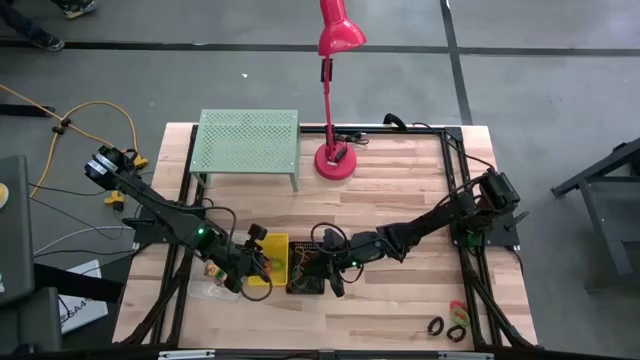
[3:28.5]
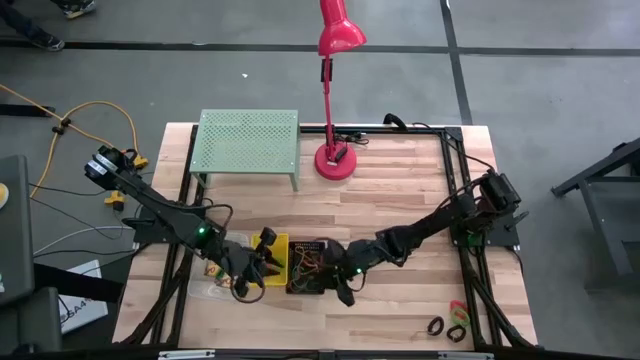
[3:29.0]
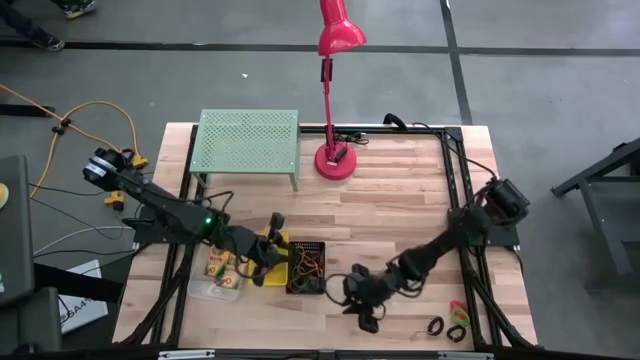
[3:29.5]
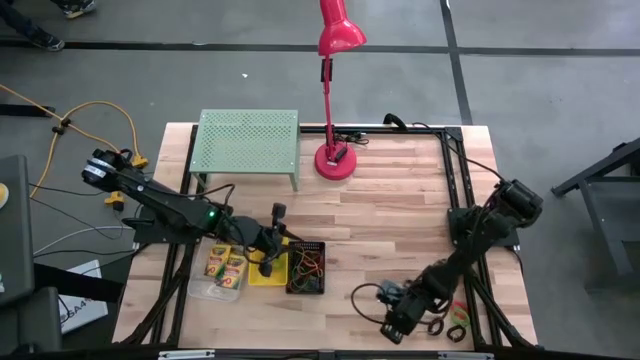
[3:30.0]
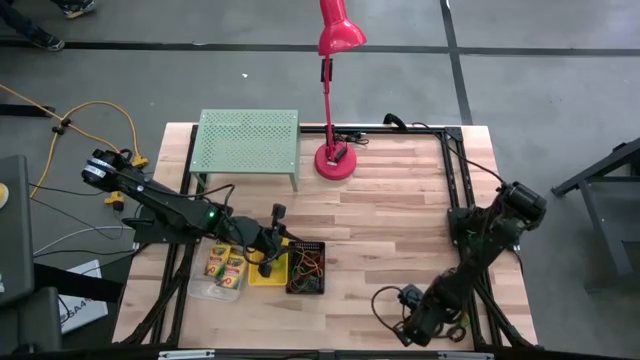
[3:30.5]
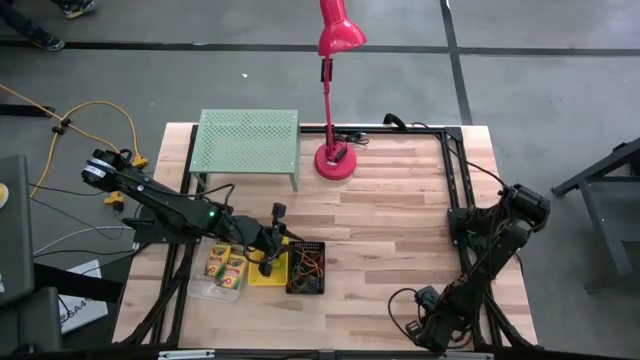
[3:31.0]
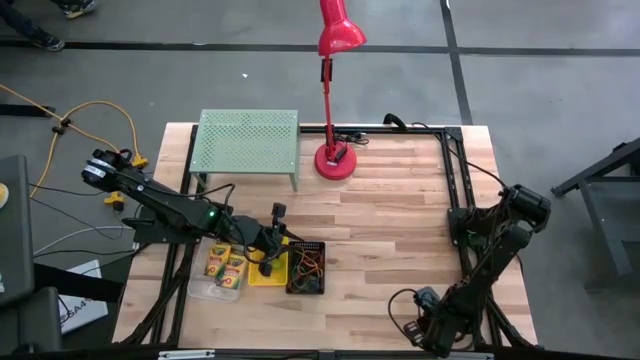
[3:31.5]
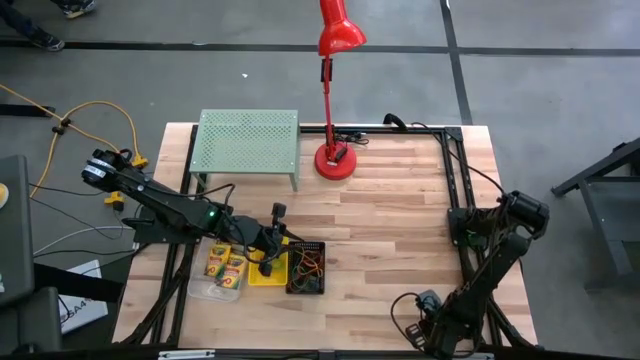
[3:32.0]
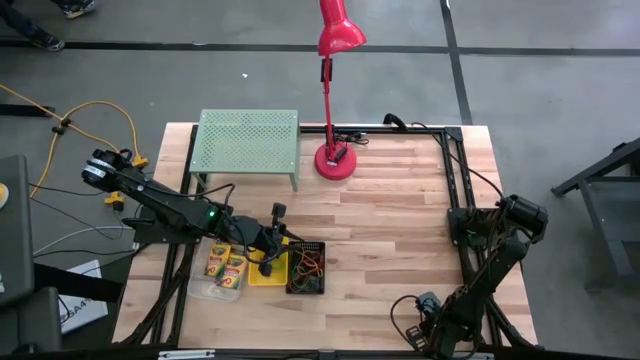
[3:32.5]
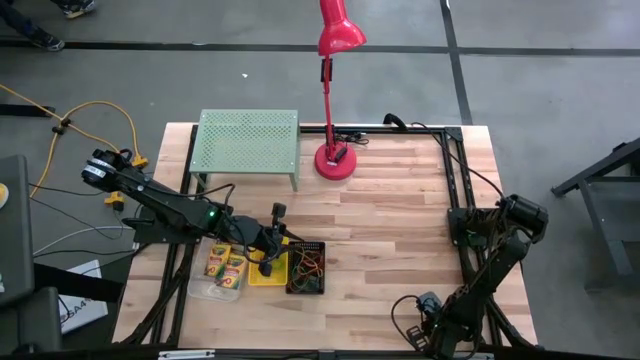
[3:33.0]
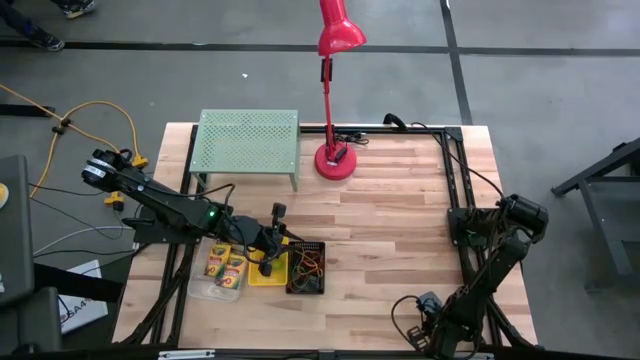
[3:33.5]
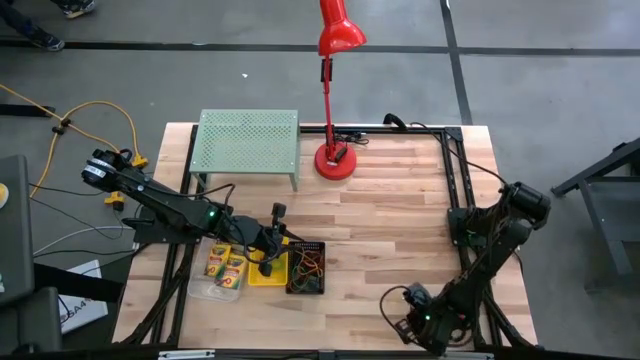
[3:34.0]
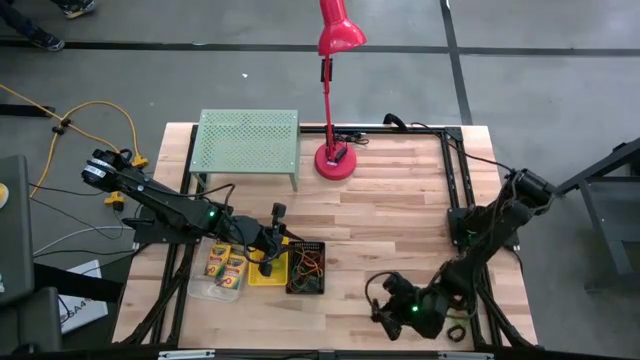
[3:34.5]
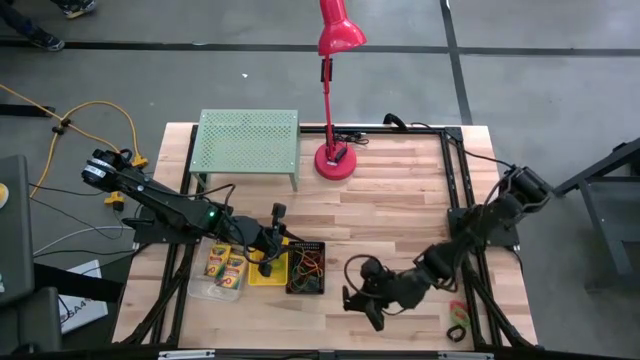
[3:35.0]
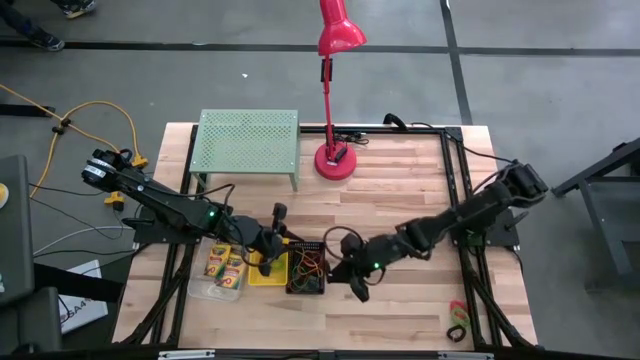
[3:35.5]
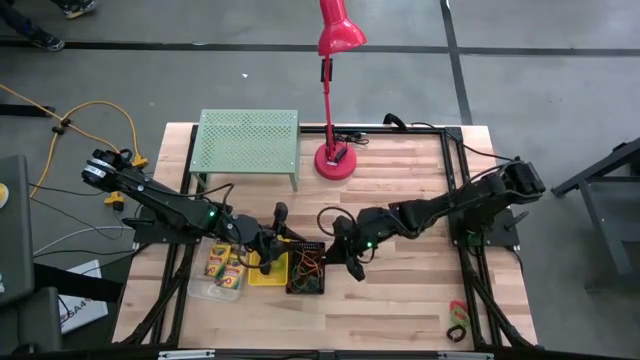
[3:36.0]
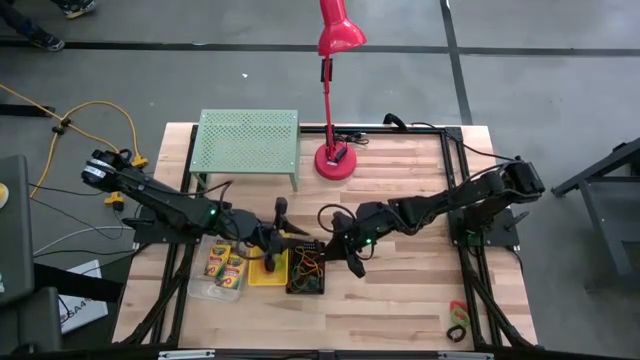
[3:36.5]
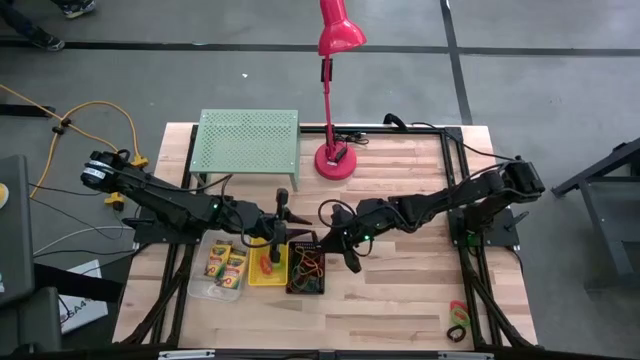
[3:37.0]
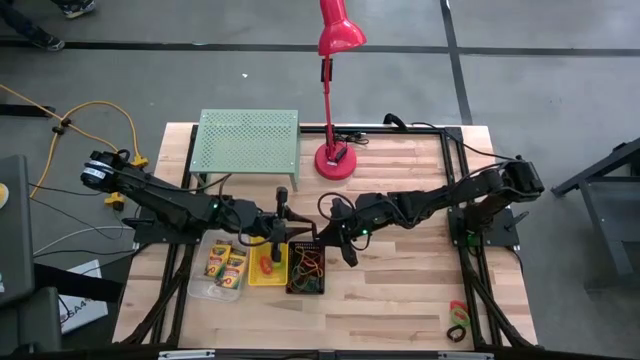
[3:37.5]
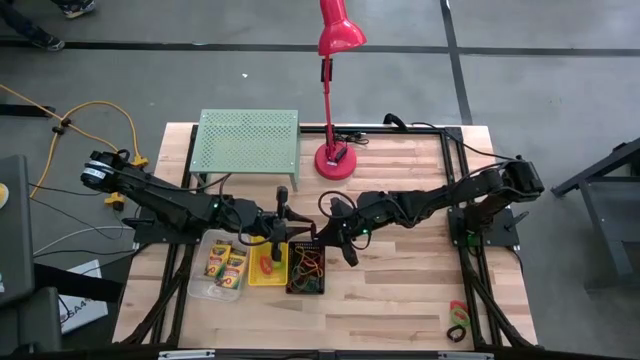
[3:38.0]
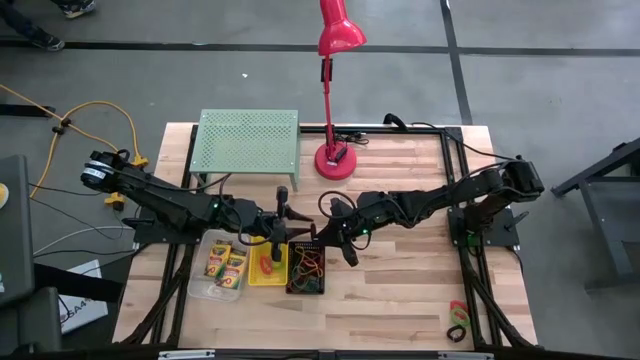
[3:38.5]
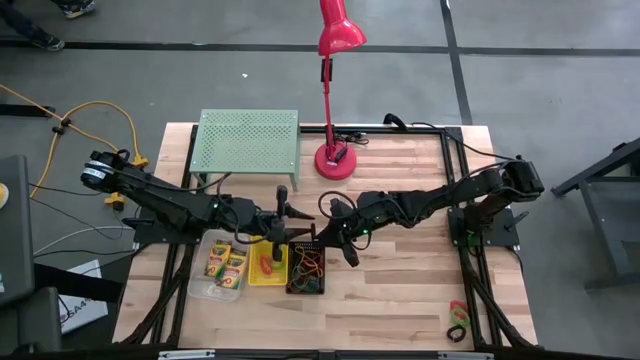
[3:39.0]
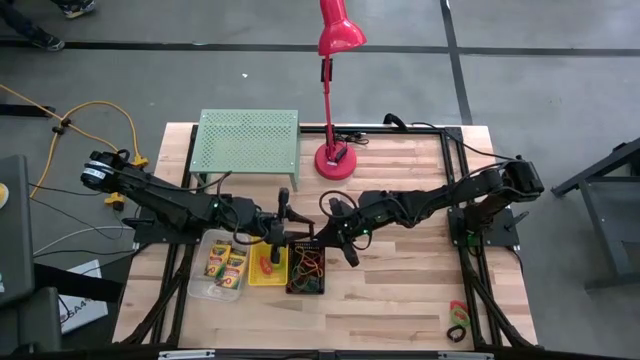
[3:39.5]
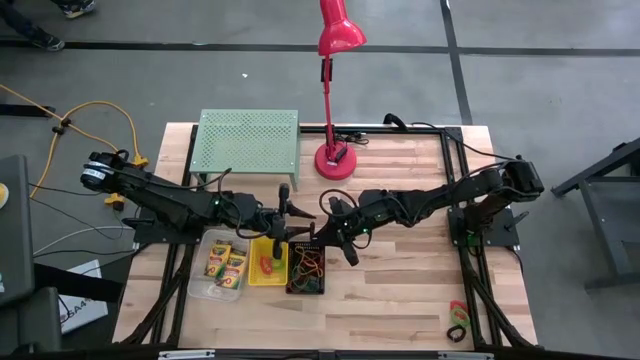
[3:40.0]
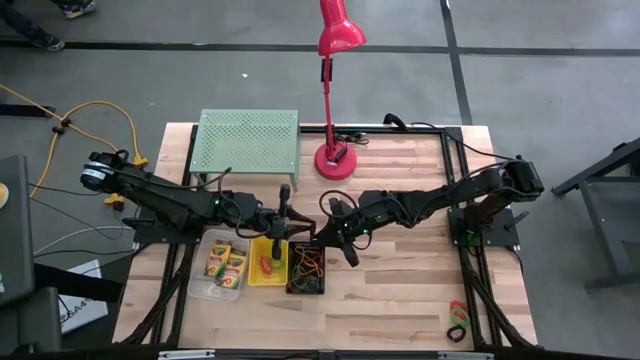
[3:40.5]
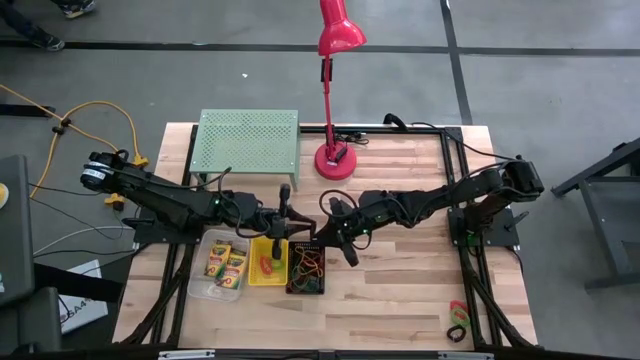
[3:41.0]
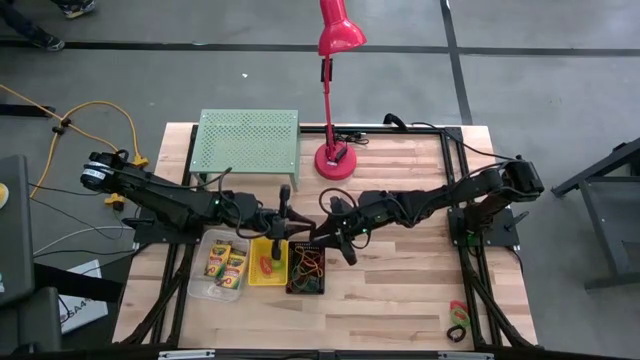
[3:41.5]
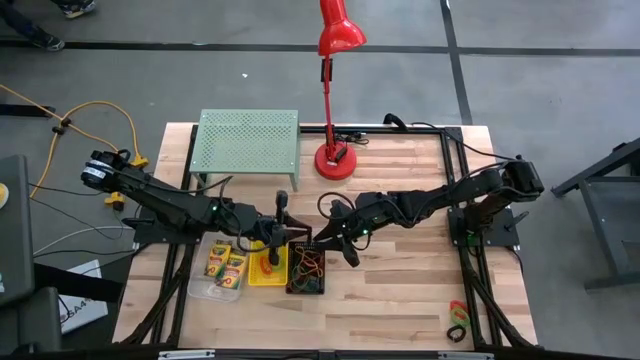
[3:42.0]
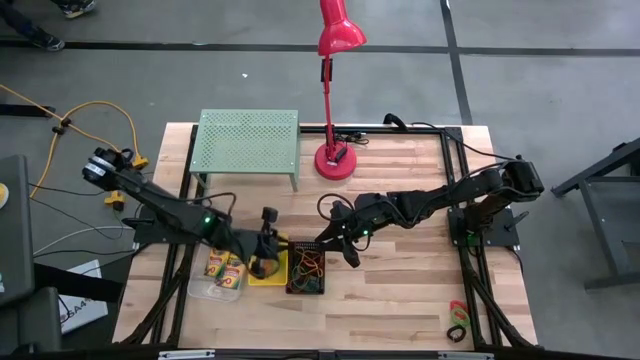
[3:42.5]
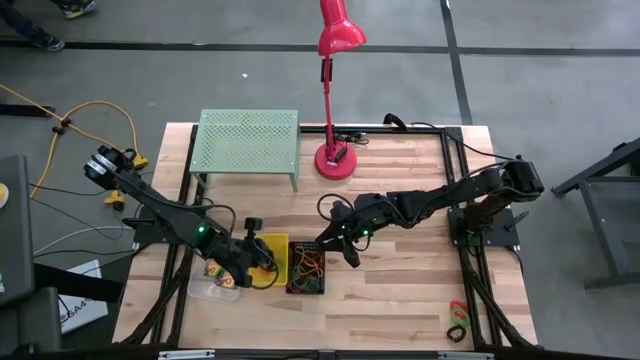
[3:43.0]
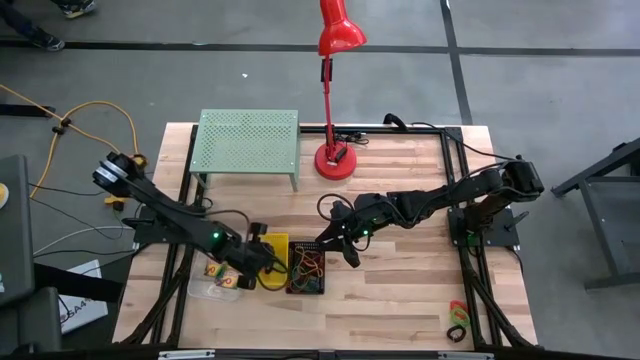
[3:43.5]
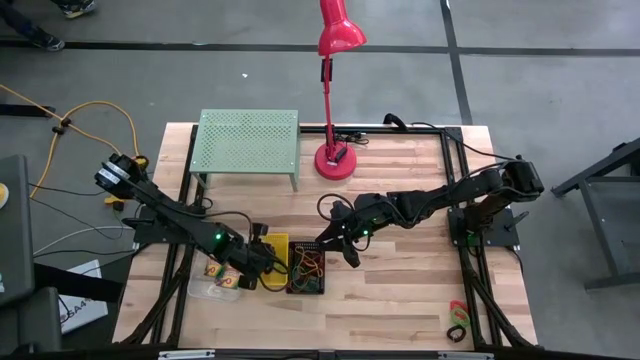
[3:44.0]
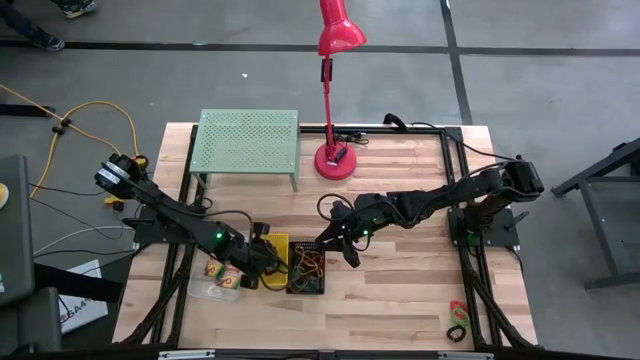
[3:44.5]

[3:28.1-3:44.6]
Task: Pick & Place Office Desk Supplies
Put the black spring keychain into the yellow bin

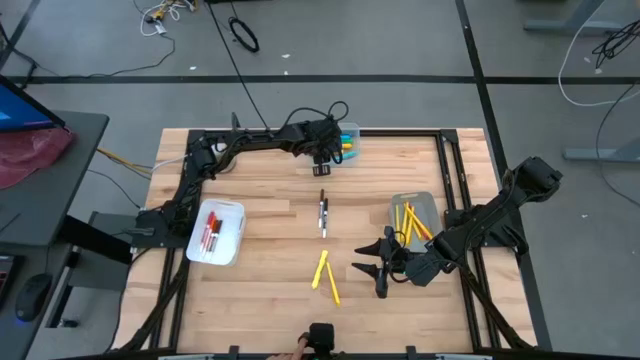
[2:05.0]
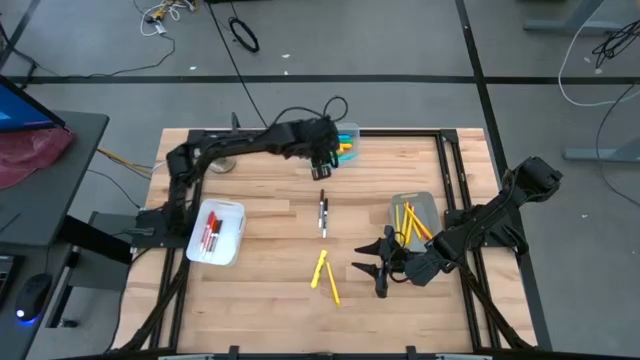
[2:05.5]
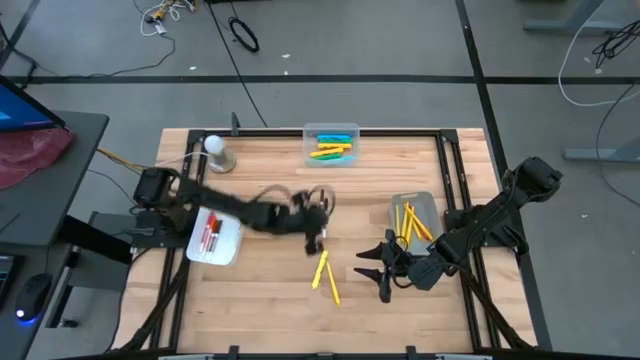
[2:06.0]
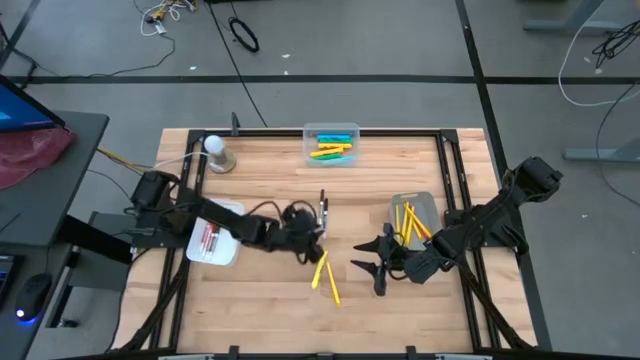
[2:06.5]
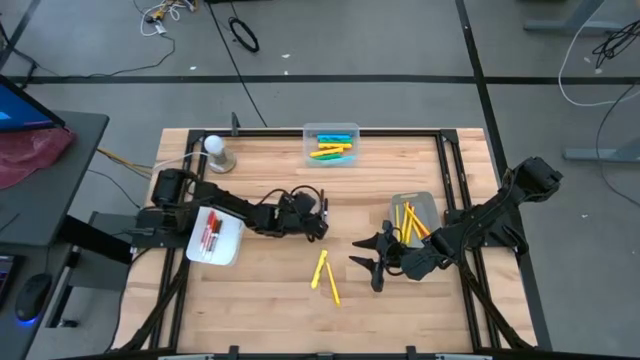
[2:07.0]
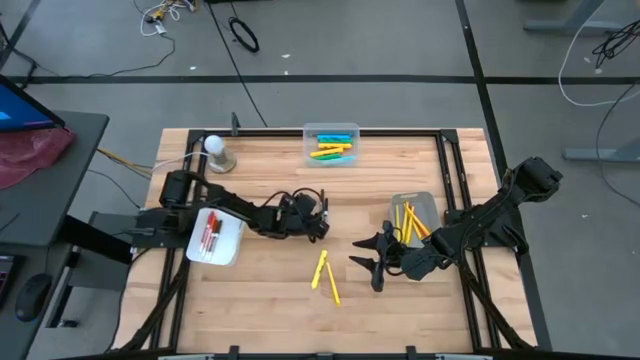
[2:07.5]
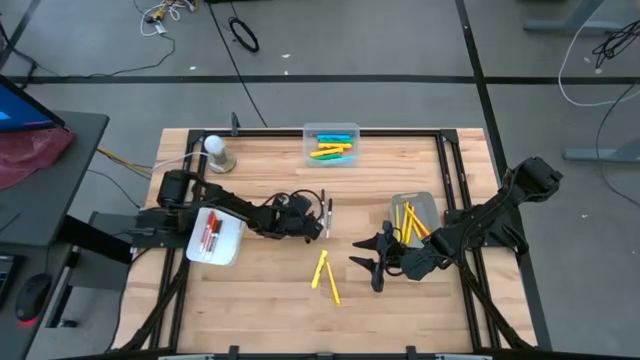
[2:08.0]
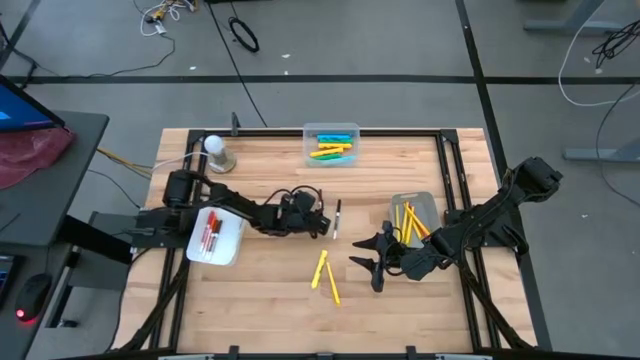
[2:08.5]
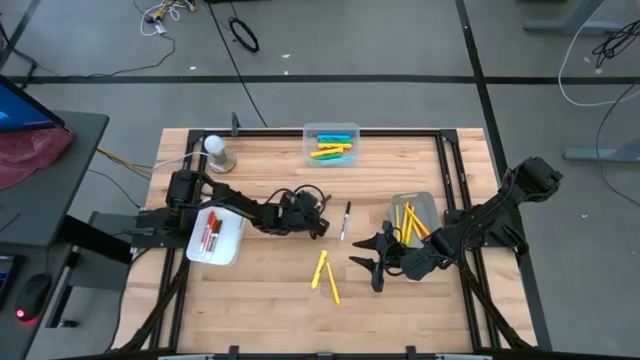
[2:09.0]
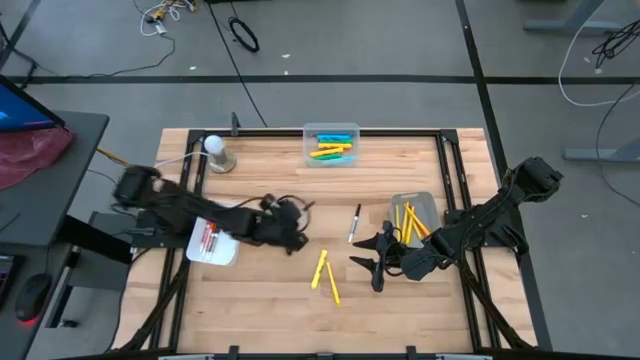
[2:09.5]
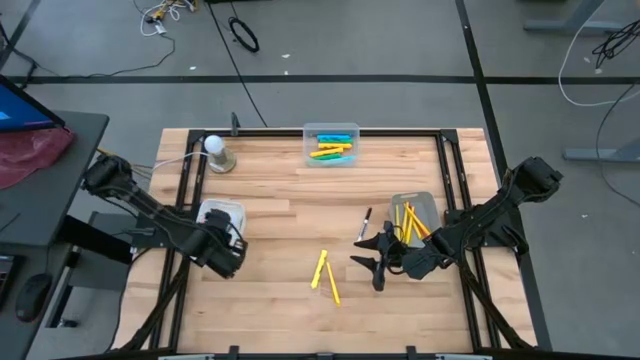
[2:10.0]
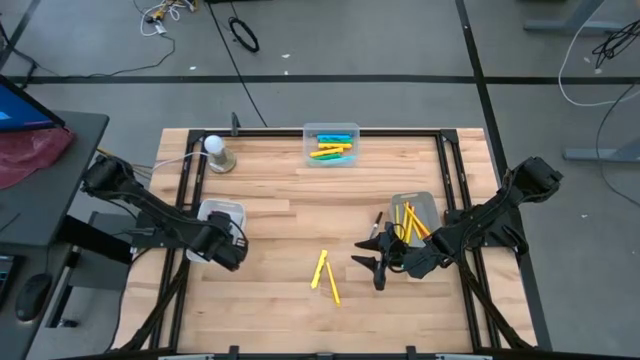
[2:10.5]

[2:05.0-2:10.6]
Task: Pick & Place Markers
Put the dark brown marker pen into the white bin
